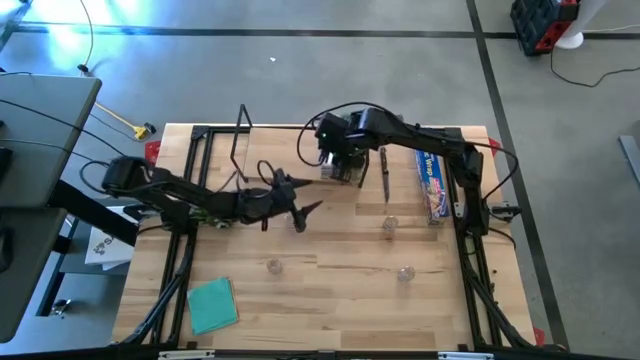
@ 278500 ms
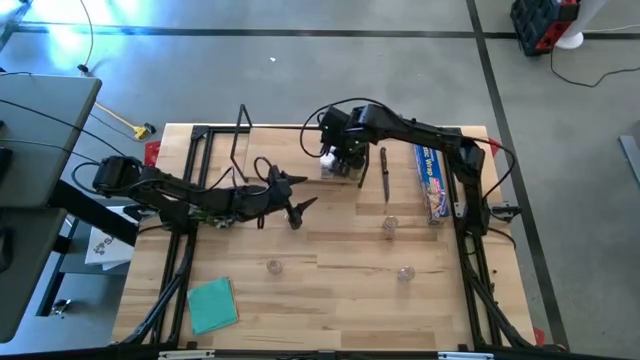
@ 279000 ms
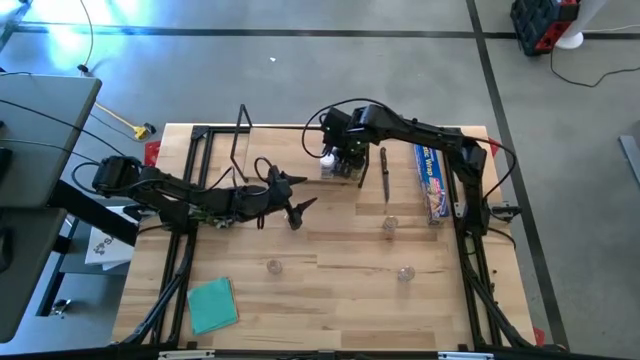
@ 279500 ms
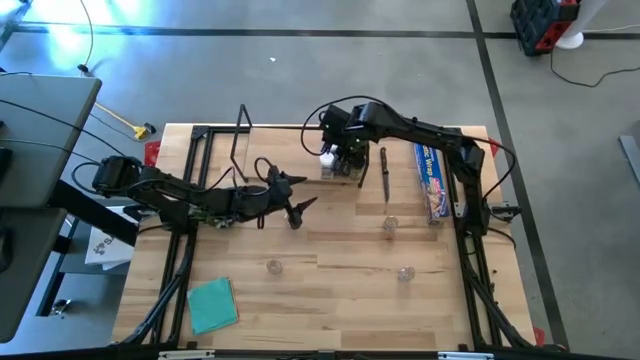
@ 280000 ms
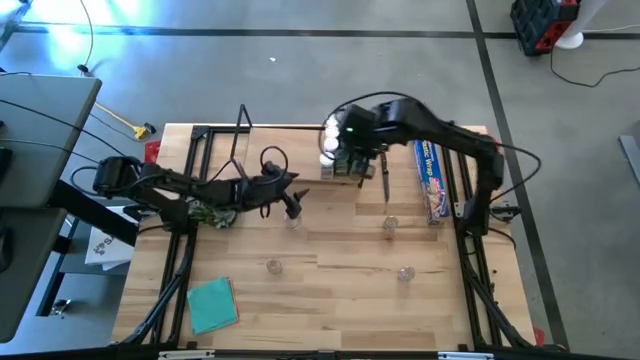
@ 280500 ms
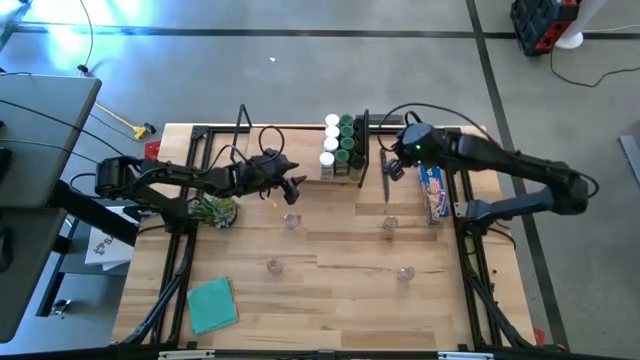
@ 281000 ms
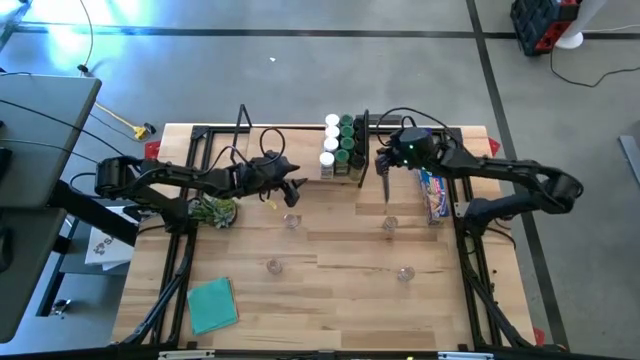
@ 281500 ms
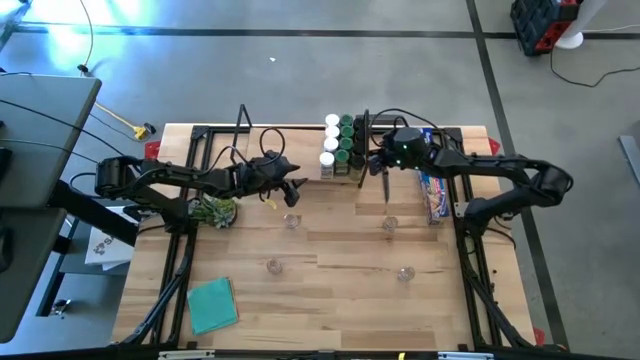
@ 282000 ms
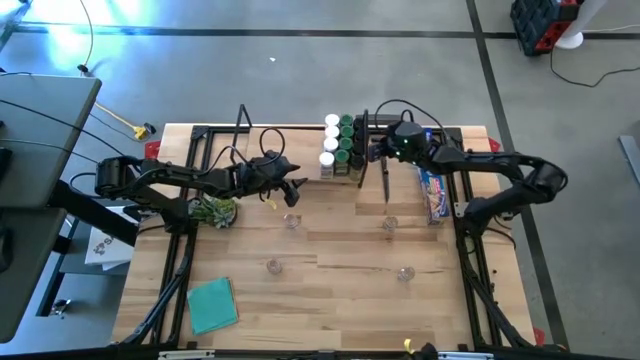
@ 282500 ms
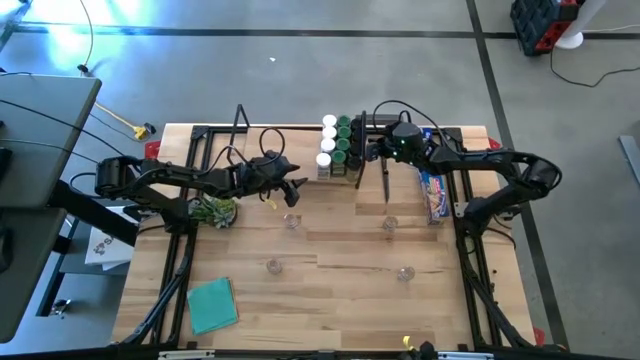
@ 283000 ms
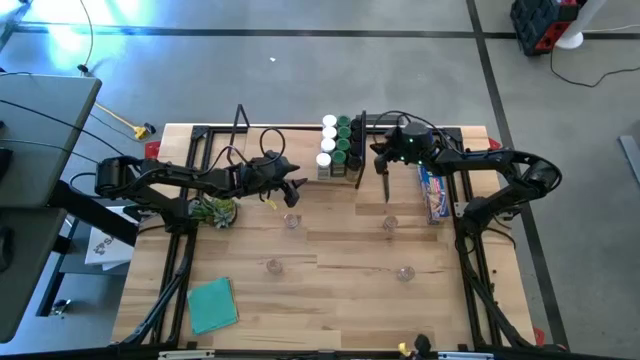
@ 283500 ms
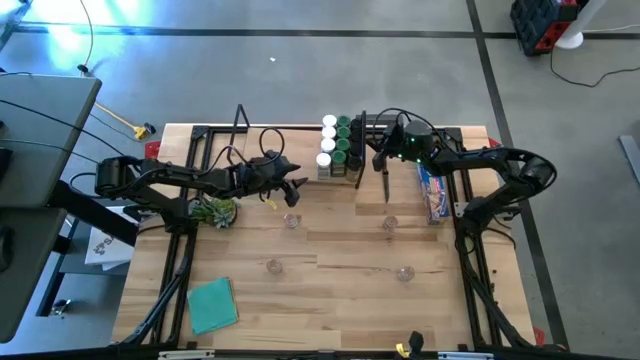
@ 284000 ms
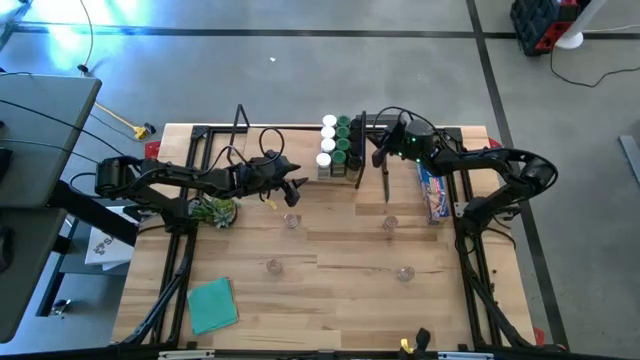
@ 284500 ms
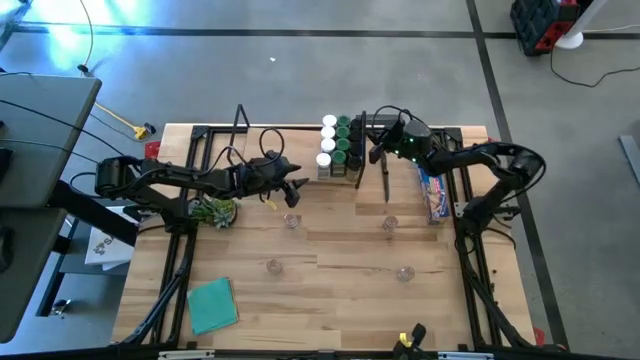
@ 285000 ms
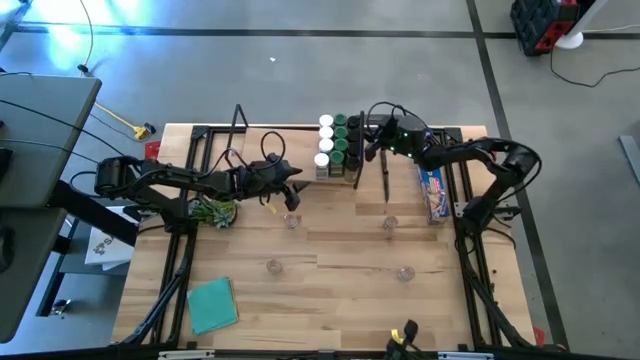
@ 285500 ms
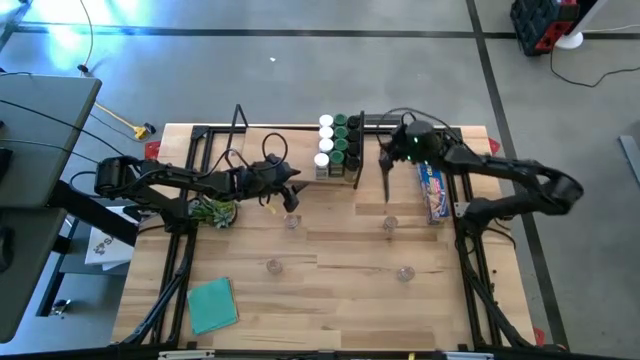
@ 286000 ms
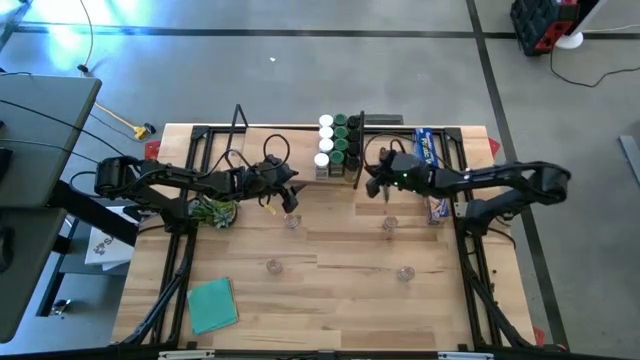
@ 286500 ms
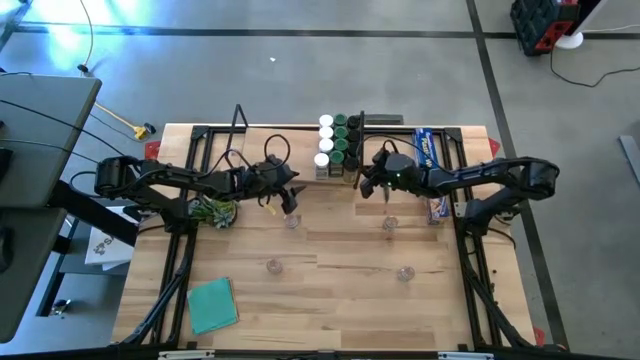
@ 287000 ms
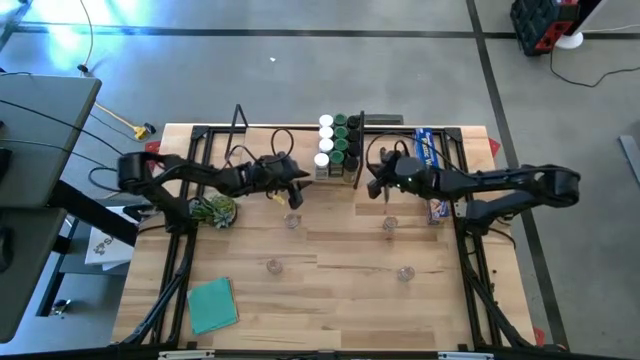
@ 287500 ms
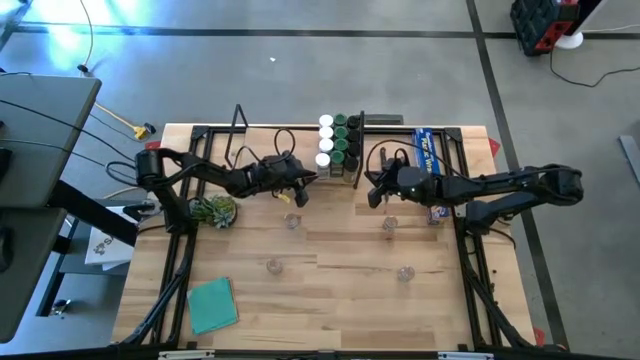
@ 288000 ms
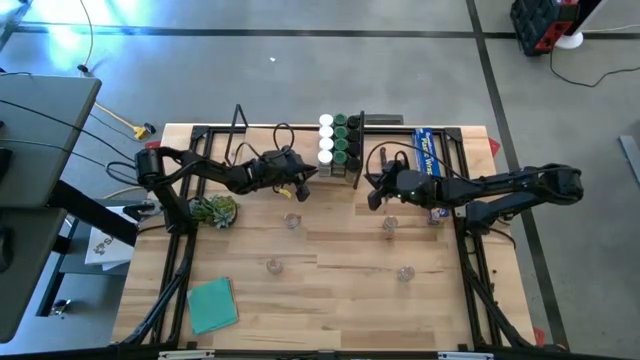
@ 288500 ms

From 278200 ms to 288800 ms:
Task: Shelf spices
Adjust the seasoning bottles on the shelf

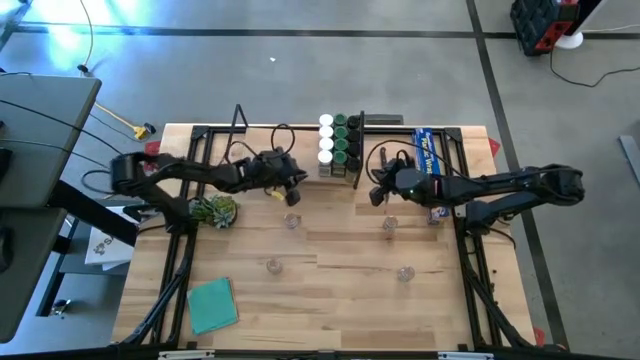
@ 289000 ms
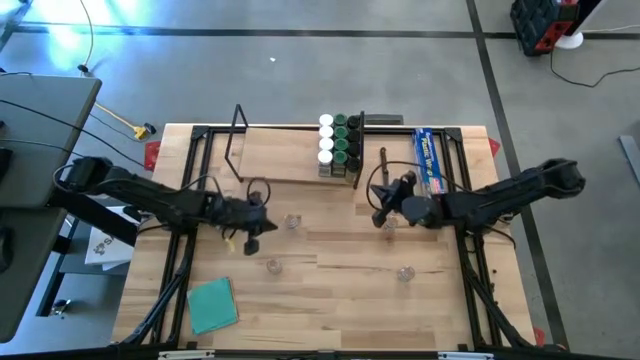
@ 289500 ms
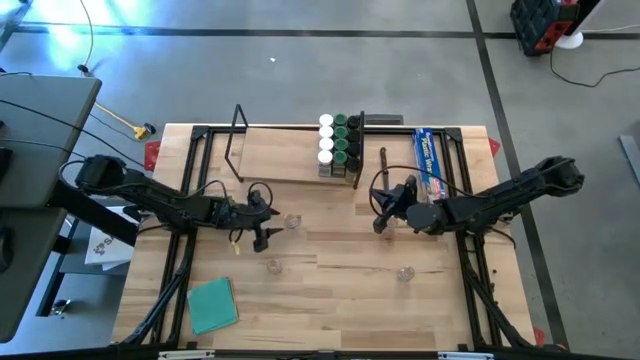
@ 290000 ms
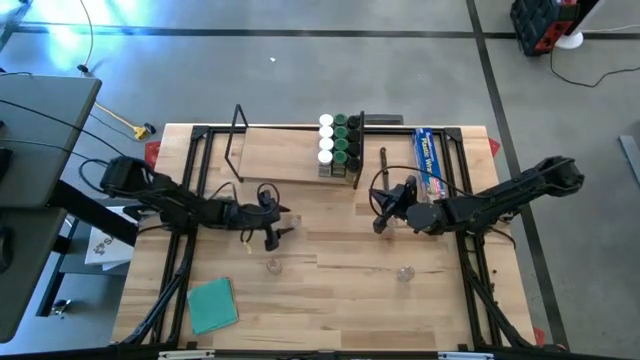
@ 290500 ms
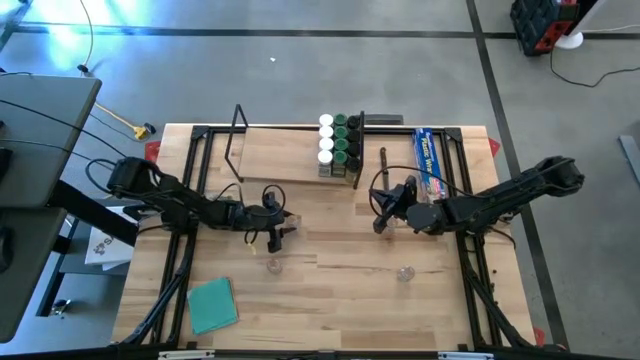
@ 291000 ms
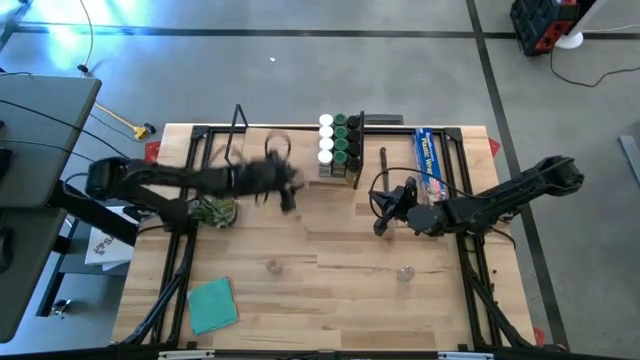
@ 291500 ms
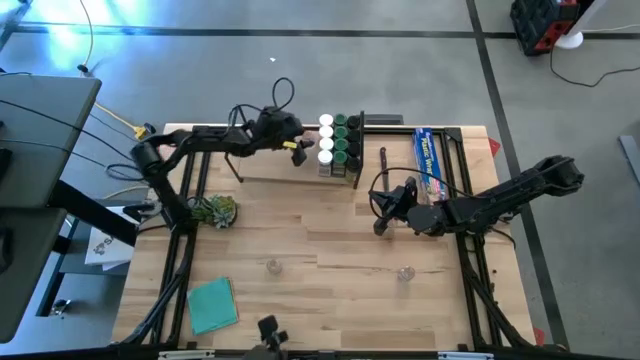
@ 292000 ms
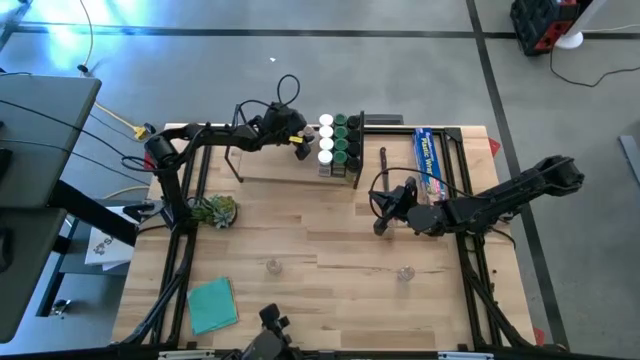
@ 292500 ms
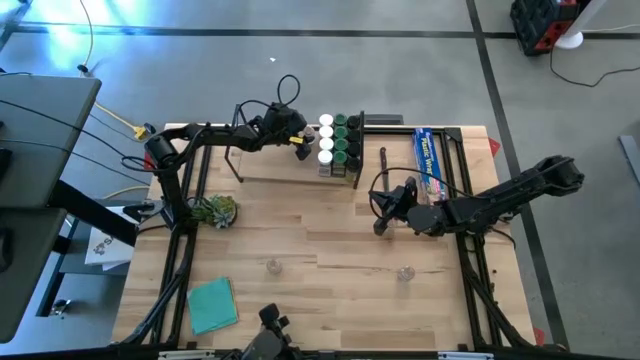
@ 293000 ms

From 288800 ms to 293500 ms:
Put the brown seasoning bottle on the shelf

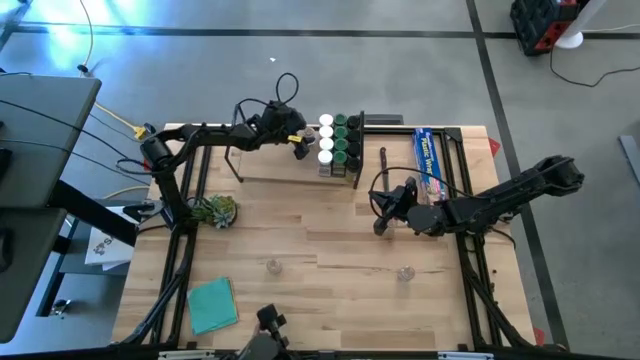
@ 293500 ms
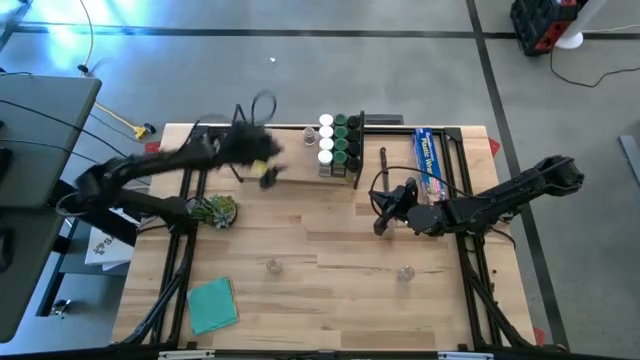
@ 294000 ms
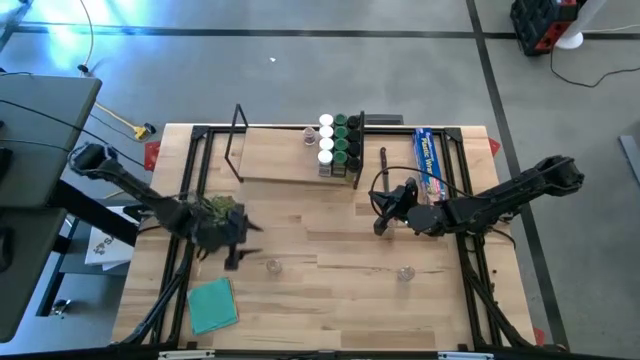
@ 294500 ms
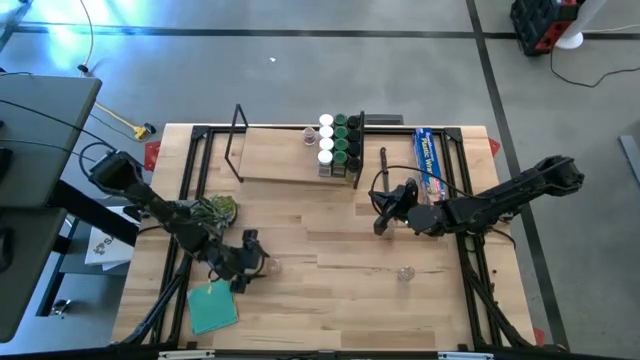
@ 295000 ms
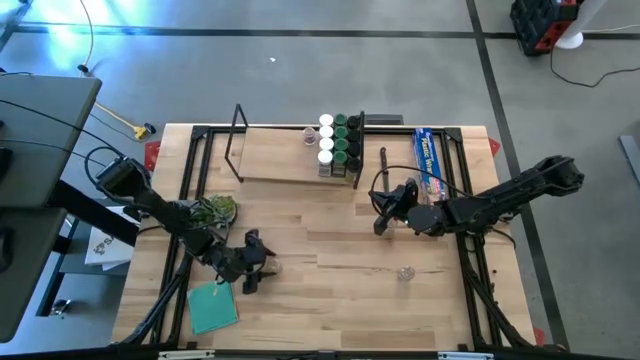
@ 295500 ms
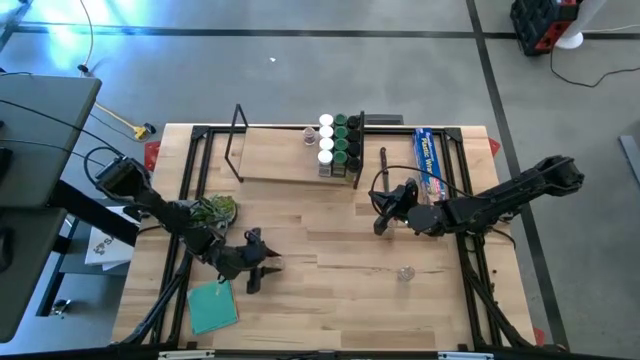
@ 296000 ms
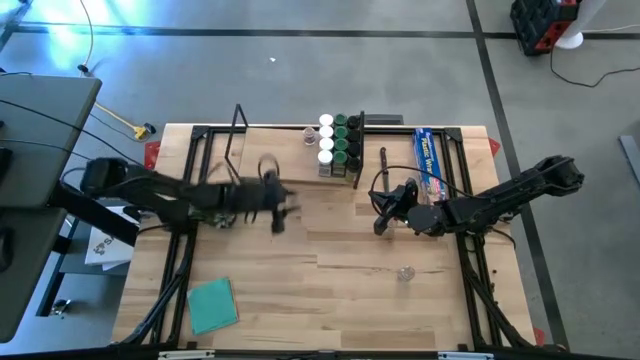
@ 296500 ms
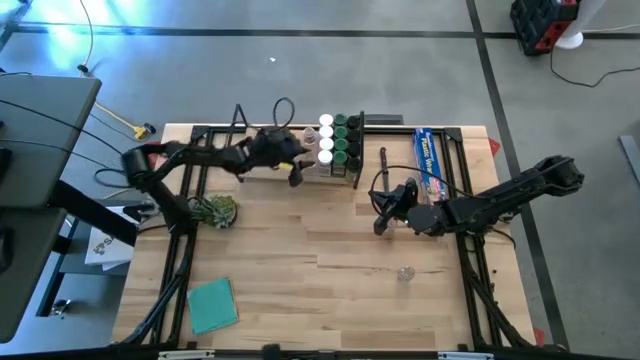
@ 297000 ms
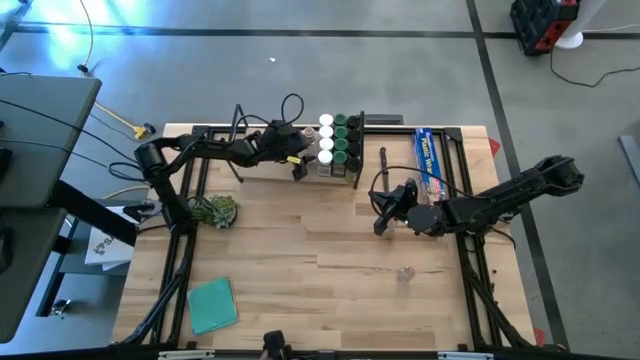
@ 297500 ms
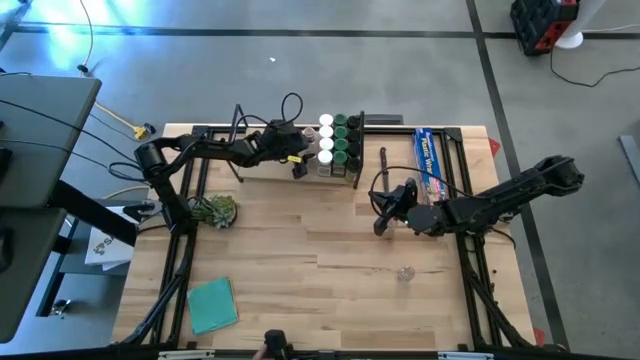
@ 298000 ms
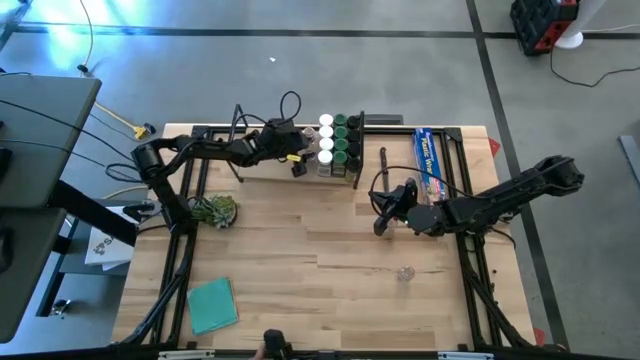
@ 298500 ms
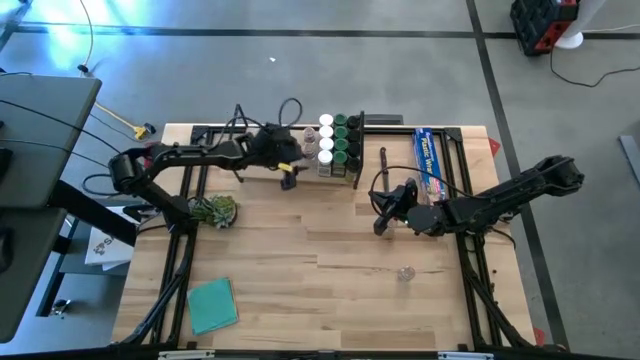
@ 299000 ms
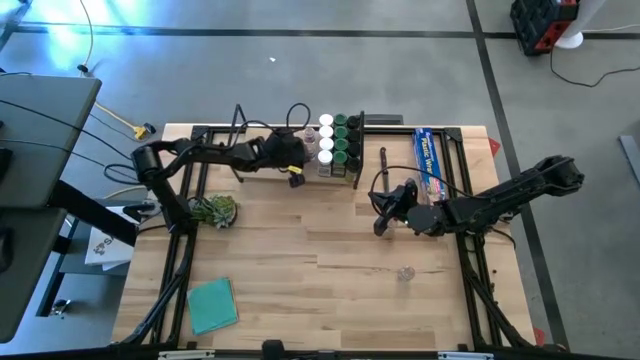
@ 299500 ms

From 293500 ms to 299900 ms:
Put the brown seasoning bottle on the shelf aligned with the other brown seasoning bottle

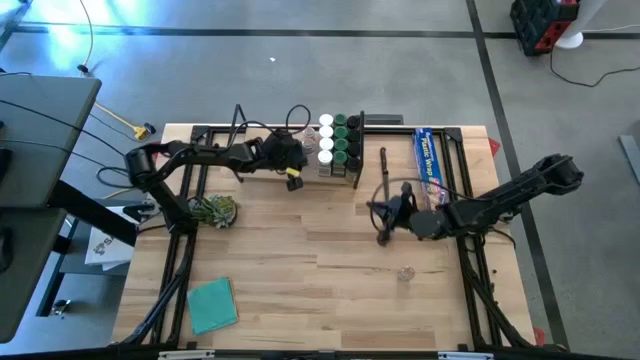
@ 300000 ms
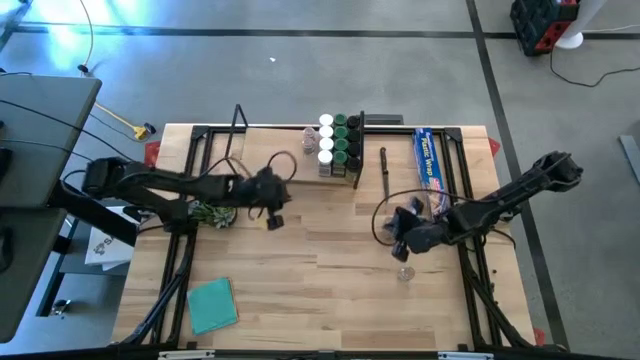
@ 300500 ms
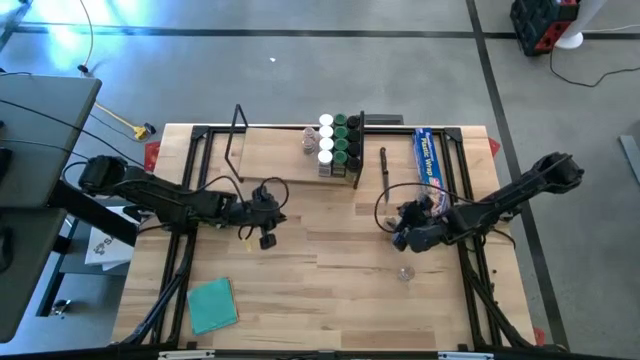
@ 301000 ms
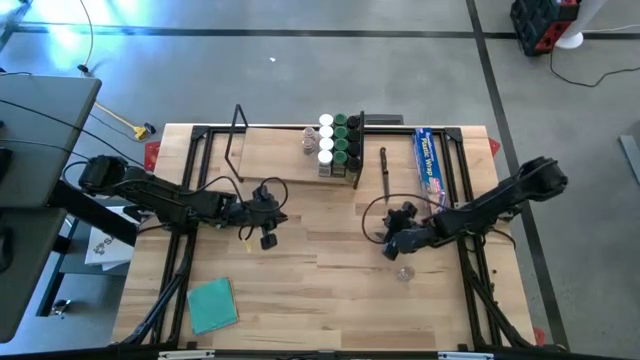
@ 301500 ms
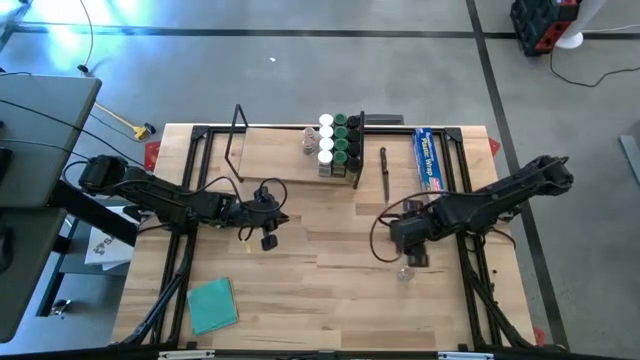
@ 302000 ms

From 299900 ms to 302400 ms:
Put the brown seasoning bottle on the shelf aligned with the other brown seasoning bottles
